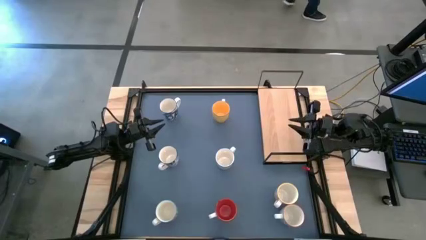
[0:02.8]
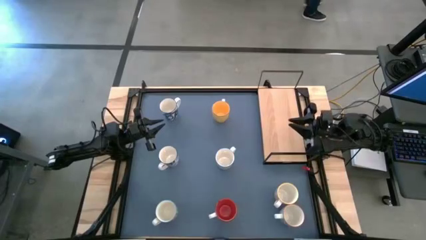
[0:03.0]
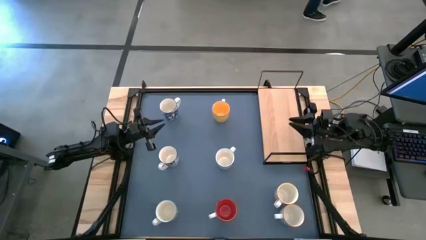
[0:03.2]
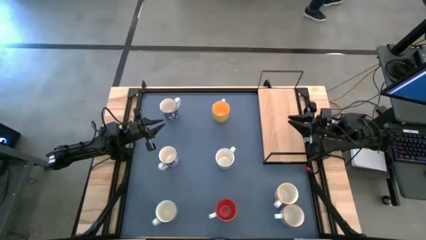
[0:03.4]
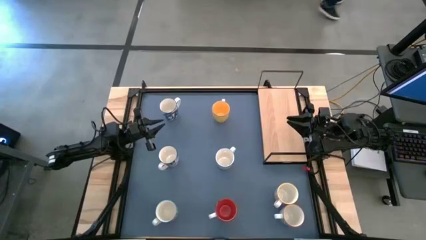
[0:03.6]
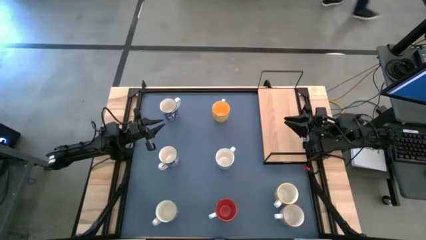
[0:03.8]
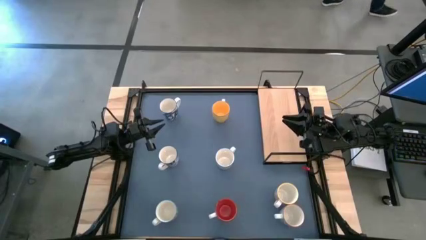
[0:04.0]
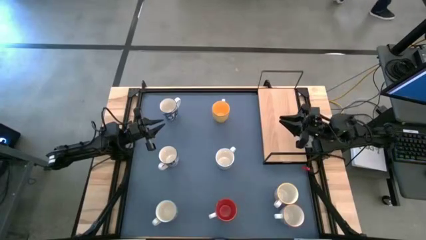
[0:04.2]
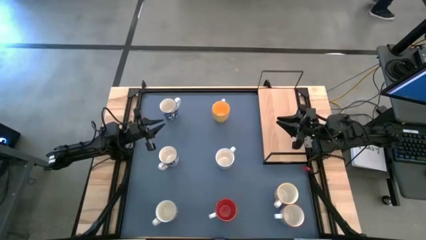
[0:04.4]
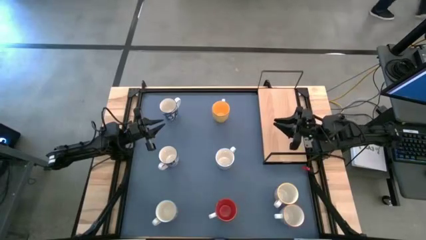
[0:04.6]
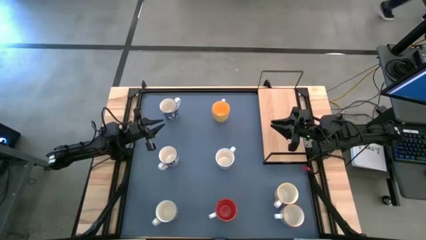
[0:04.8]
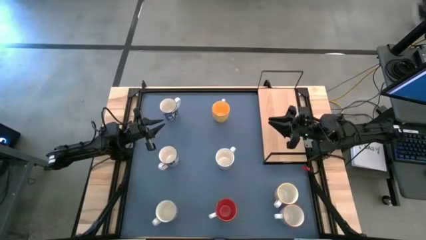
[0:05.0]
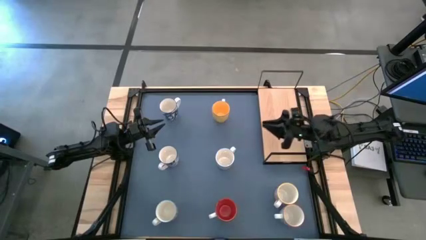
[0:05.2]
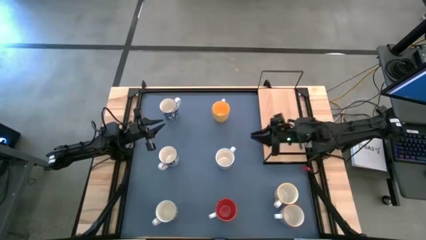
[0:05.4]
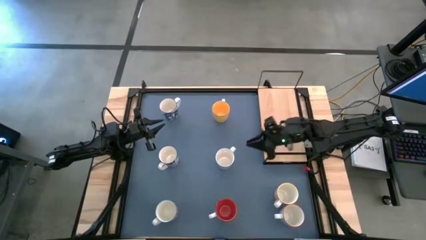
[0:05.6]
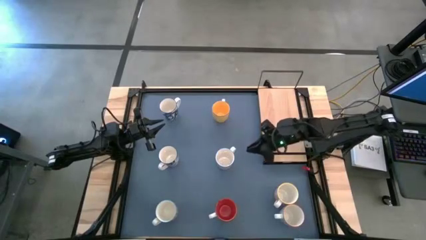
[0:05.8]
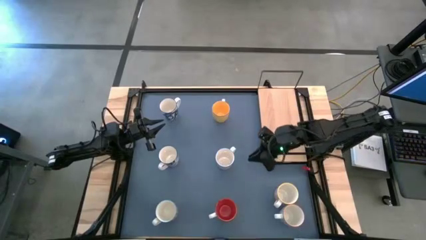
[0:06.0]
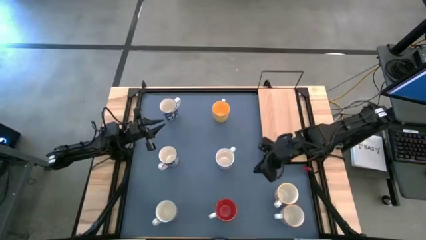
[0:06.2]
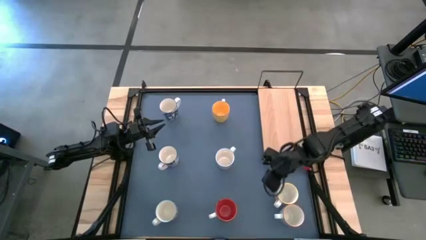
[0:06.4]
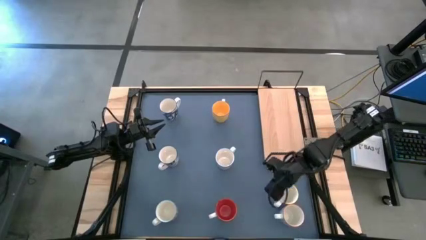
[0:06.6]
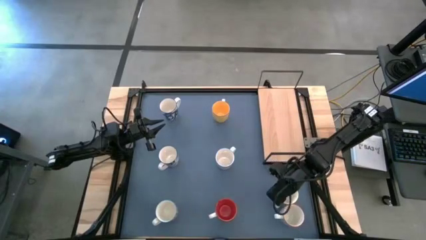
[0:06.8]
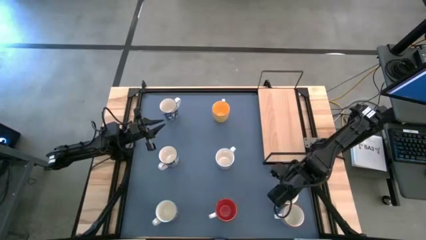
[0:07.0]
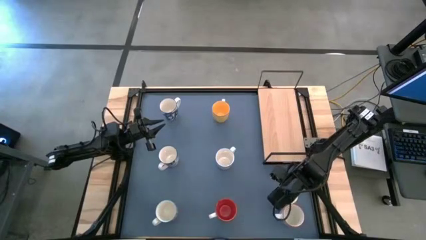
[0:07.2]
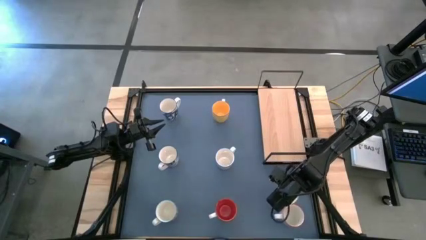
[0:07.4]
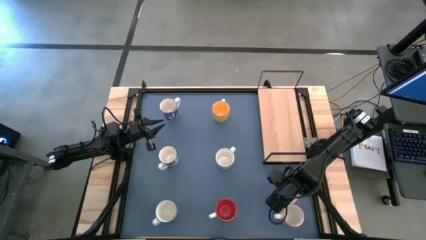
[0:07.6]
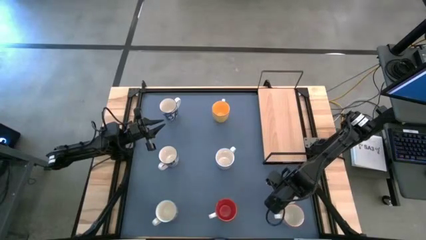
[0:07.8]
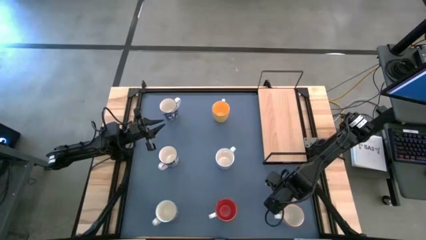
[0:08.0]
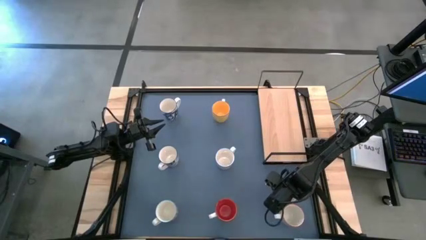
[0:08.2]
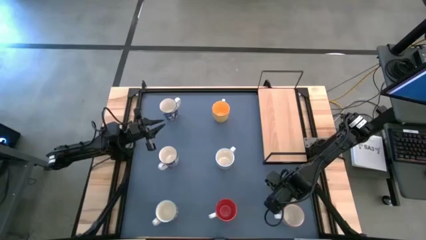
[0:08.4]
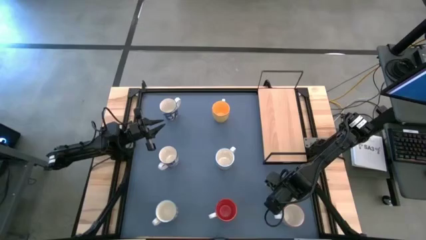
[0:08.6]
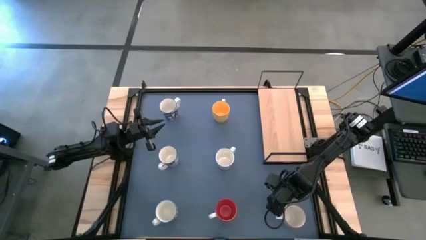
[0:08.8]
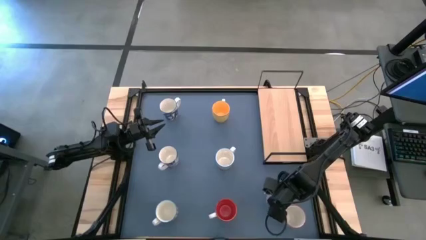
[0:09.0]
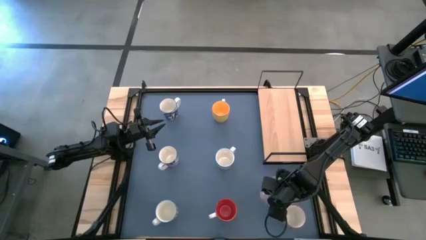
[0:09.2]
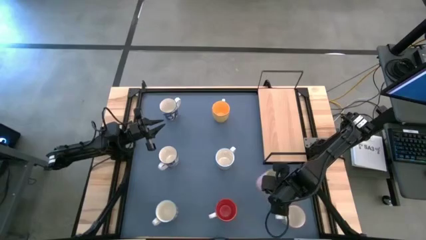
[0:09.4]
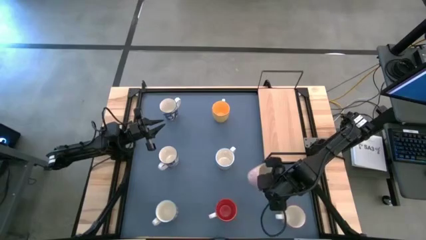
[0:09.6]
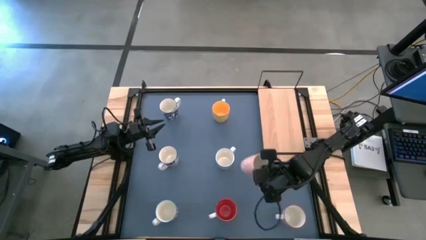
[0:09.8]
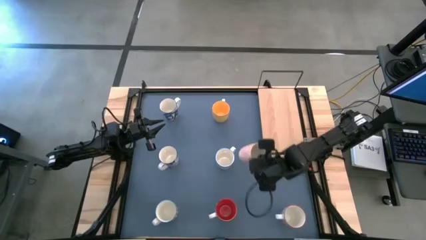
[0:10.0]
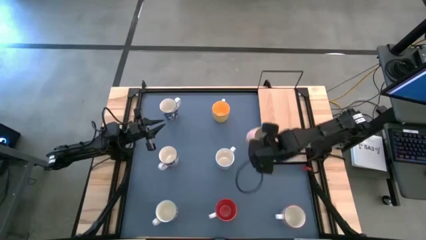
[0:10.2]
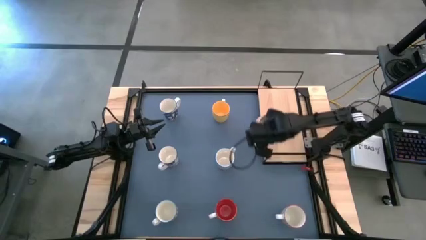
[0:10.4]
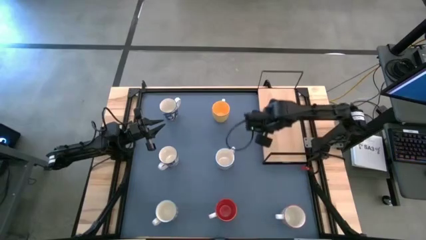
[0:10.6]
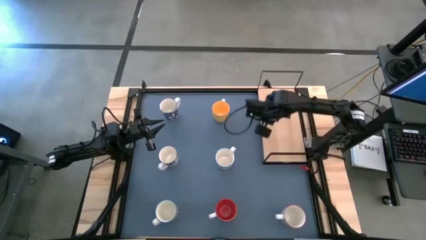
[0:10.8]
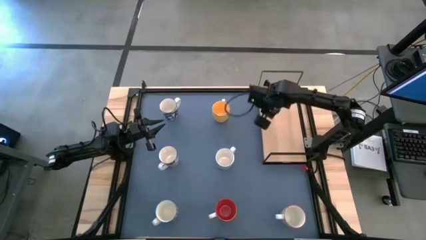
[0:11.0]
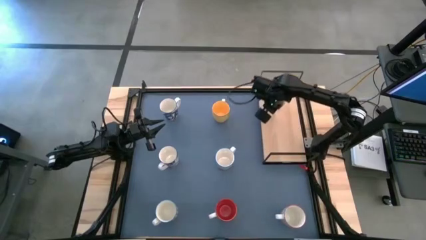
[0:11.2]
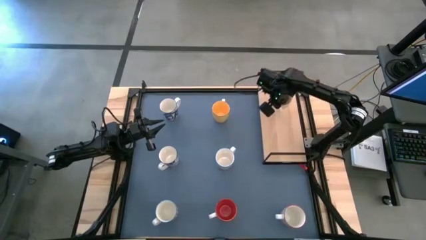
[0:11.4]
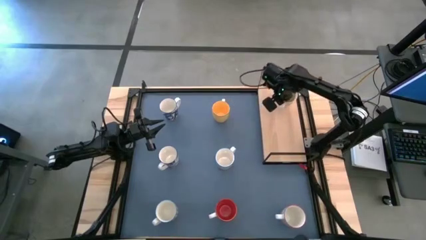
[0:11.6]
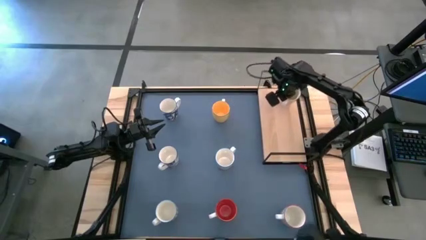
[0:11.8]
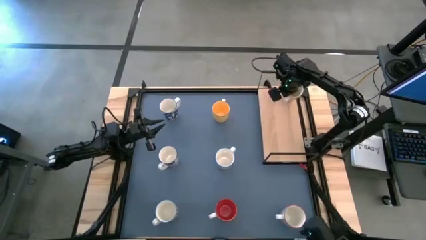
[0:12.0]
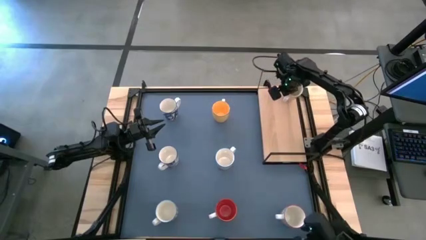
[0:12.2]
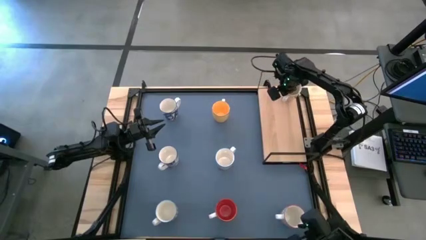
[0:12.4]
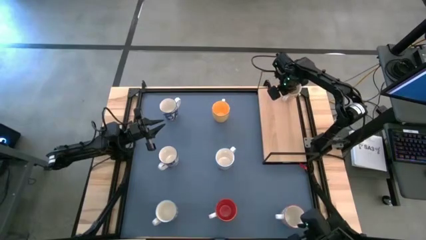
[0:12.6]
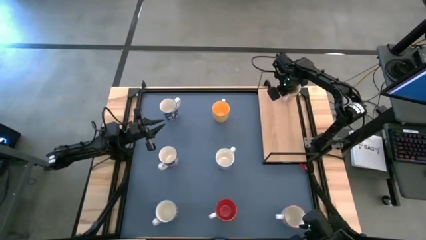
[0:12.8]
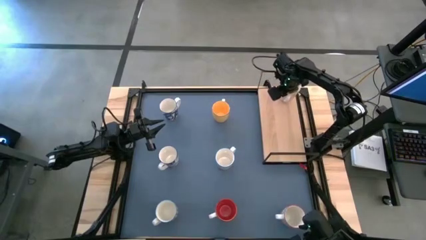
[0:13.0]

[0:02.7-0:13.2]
Task: Place coffee mugs
Put the orange cup on the shelf
